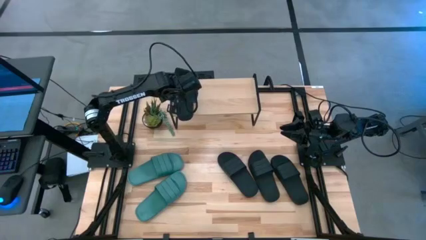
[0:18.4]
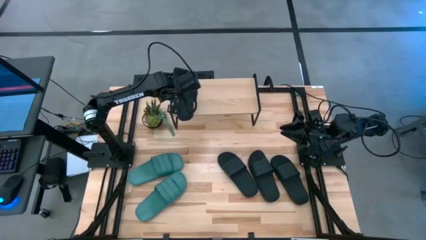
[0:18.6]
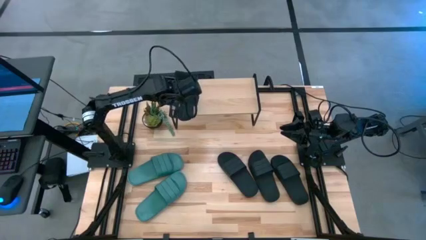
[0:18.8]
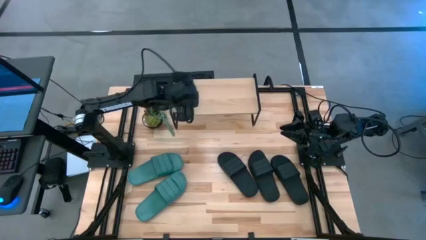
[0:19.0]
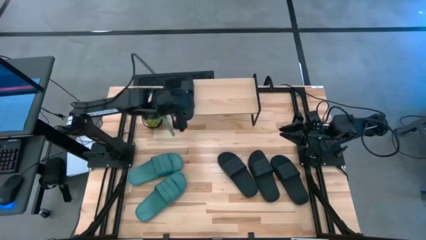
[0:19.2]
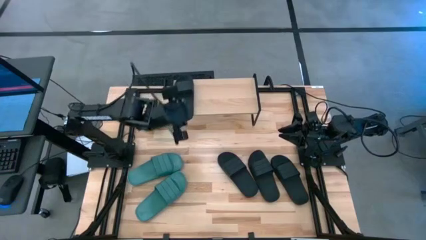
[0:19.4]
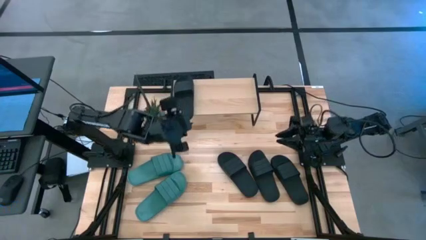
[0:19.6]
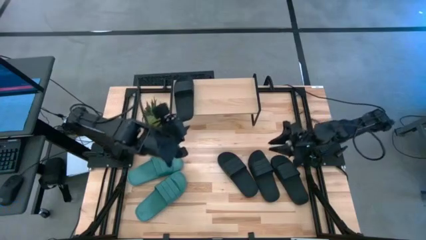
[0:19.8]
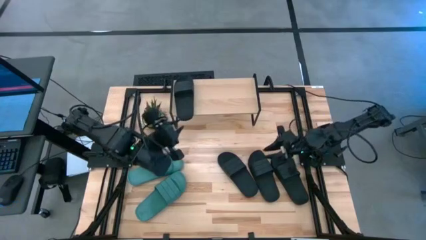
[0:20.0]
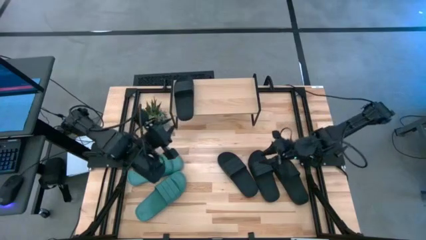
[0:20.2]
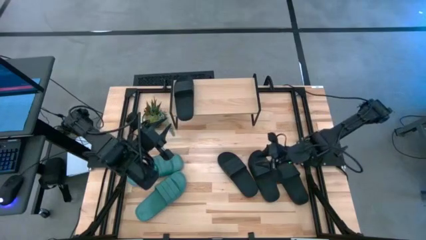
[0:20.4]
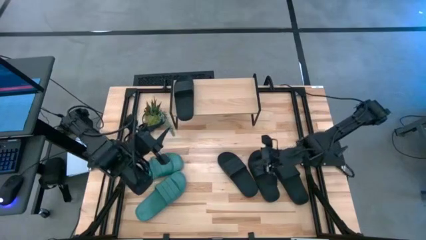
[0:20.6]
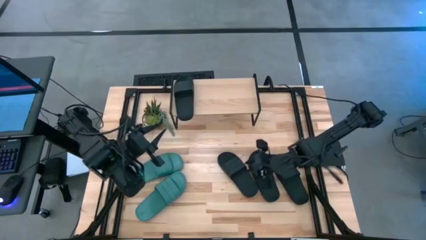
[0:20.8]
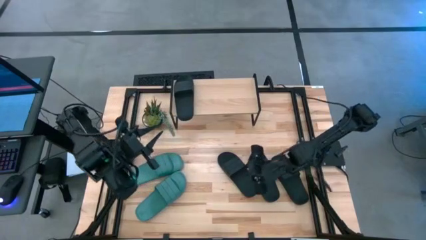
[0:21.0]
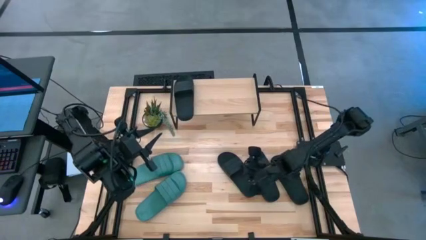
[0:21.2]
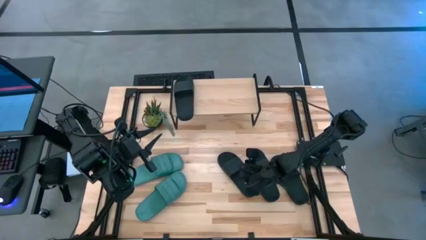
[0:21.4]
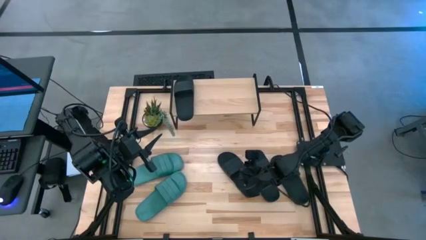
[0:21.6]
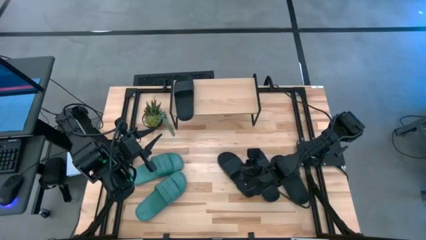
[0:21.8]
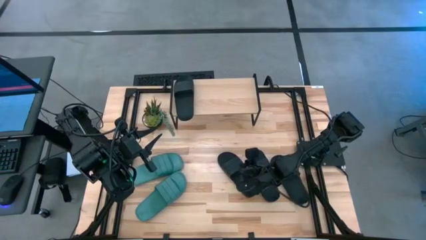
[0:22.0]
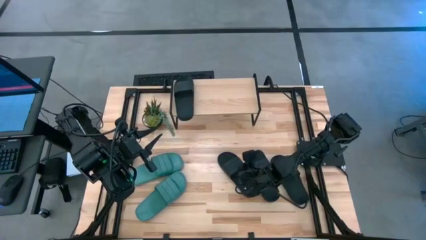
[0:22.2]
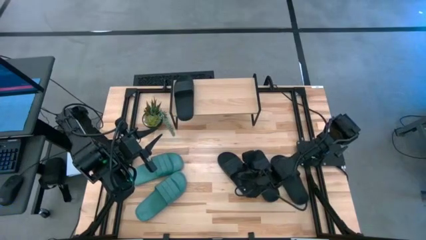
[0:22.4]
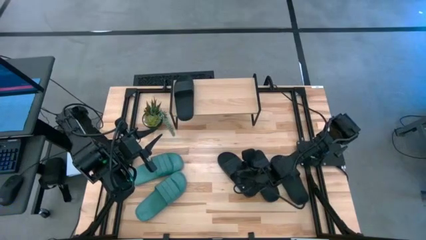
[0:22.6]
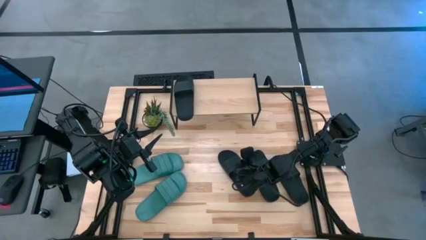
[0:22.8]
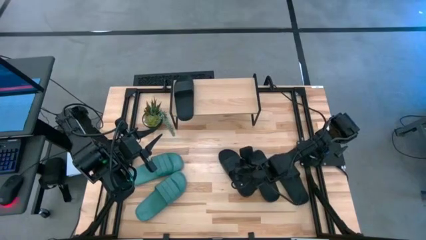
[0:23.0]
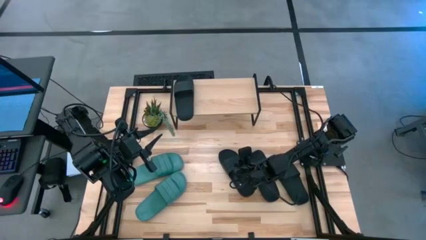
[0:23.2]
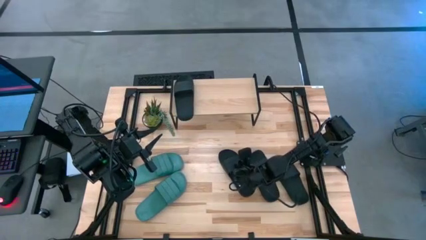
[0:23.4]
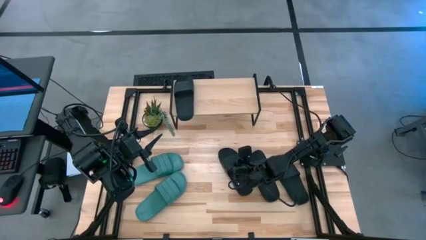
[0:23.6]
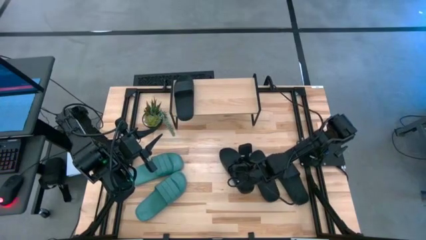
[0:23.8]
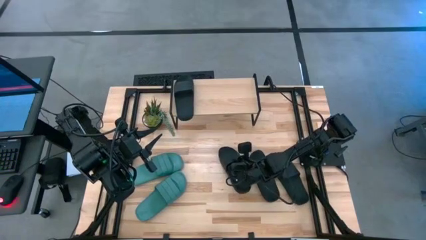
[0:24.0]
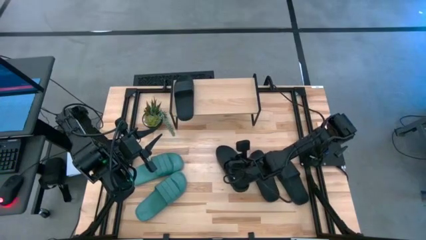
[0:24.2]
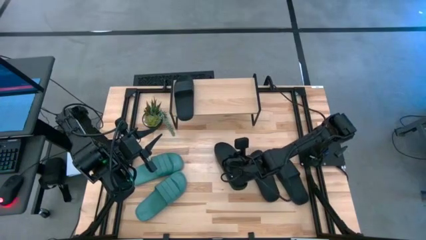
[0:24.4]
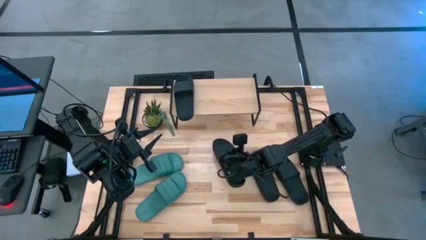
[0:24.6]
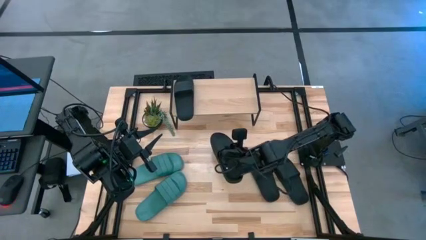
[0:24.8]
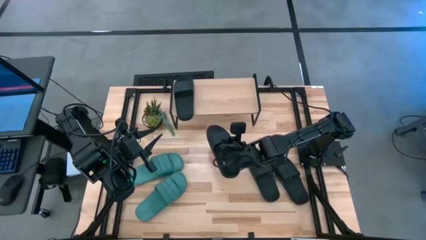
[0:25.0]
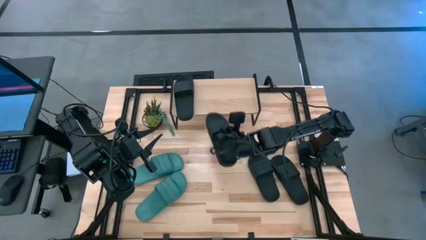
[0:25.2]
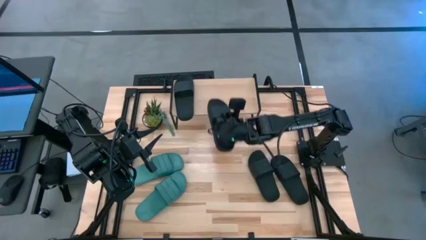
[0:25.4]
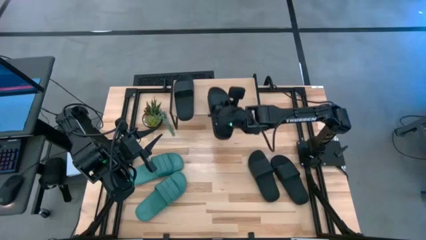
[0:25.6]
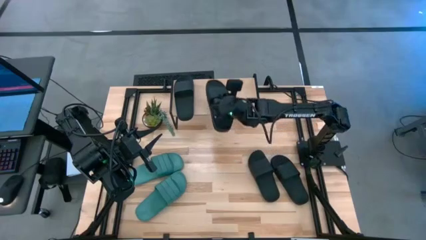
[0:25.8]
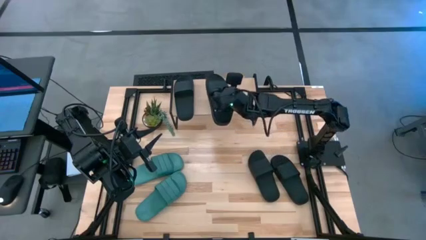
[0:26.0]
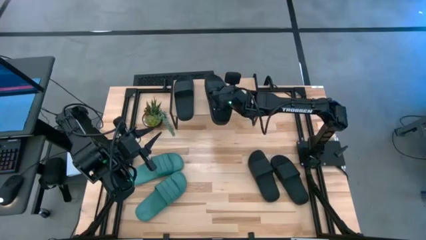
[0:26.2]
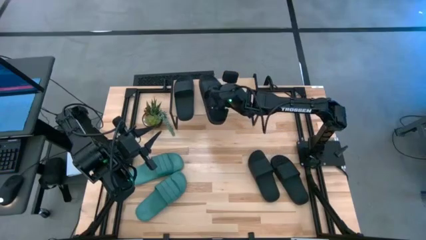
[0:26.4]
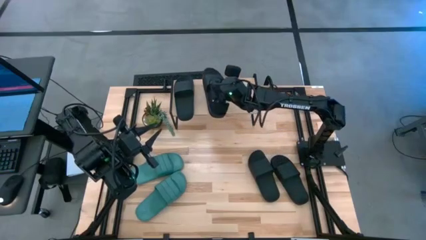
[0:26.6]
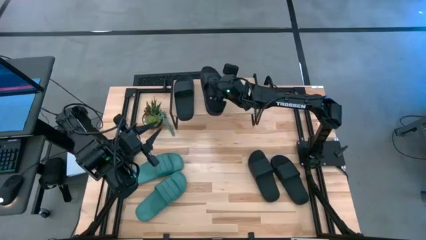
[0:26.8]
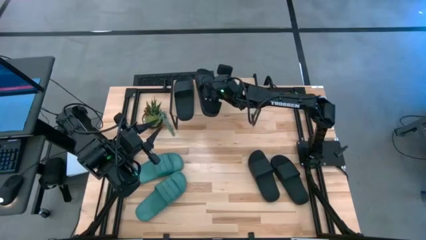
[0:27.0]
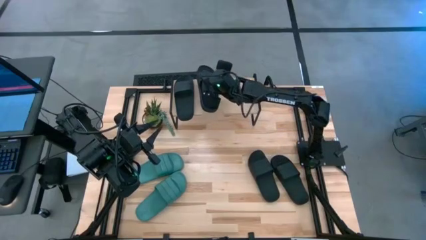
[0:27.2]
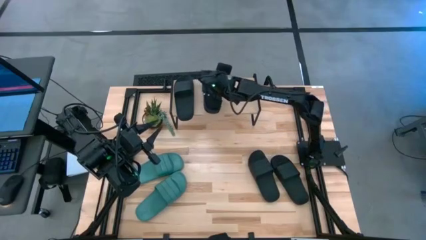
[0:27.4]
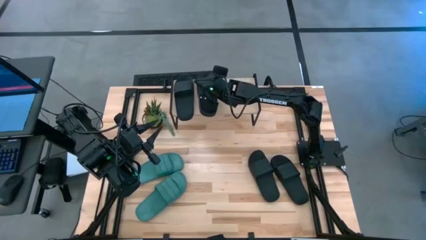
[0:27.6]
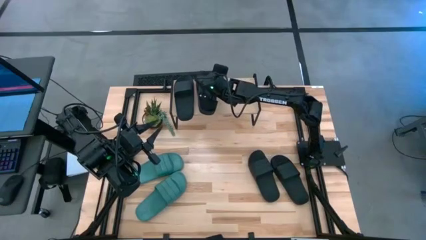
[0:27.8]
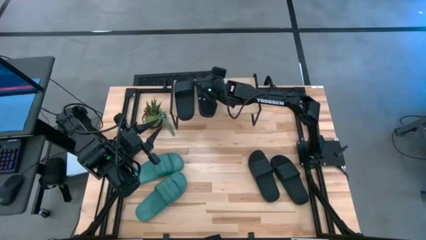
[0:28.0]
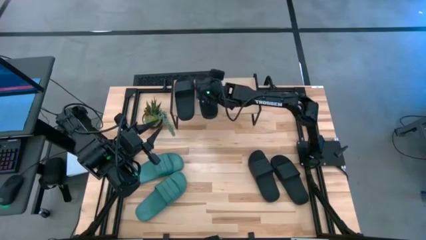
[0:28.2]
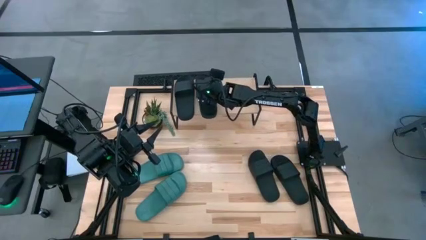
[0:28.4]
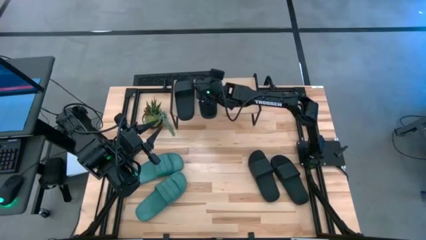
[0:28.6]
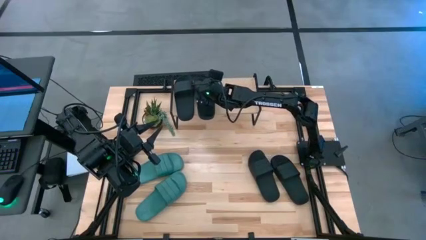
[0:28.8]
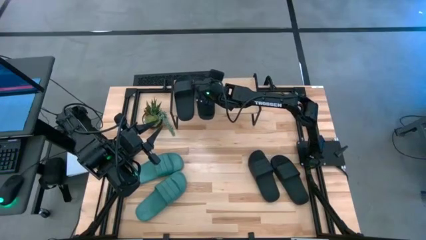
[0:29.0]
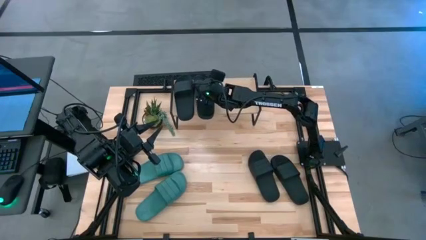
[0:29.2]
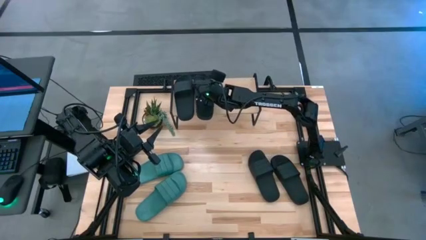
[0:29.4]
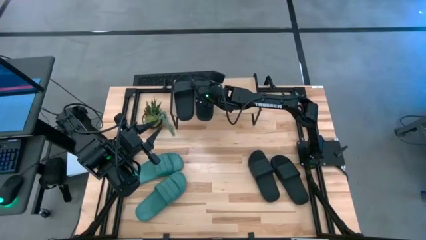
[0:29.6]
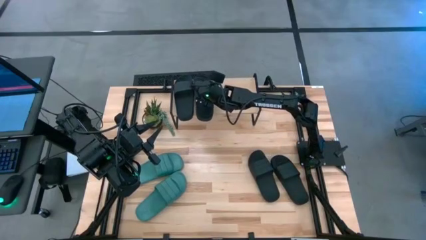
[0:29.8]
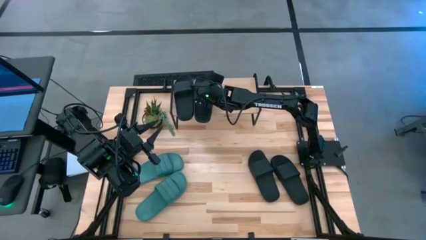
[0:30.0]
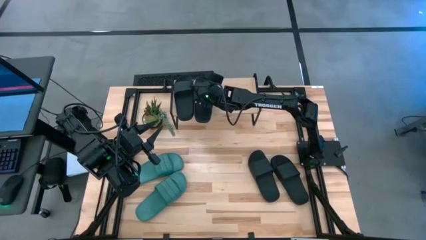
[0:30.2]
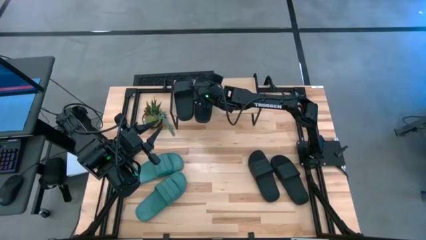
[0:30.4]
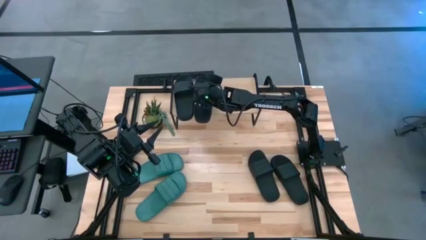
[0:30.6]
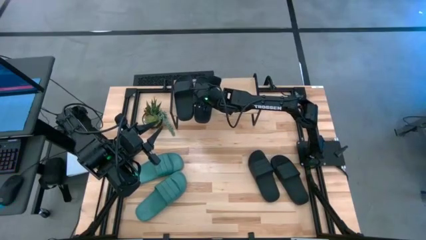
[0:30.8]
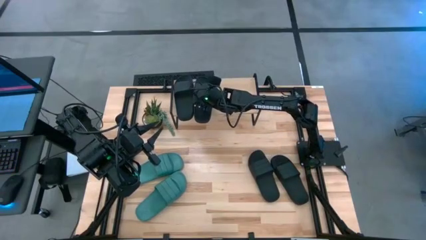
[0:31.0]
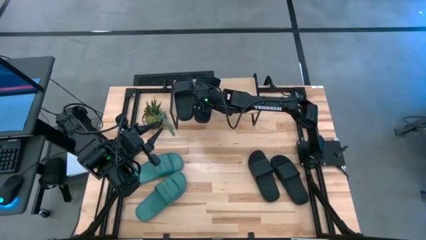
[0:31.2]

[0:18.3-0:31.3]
Task: Pick and place slides into the shelf
Put the black slide on the shelf

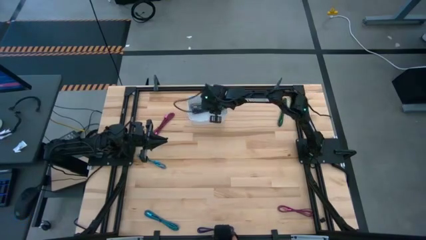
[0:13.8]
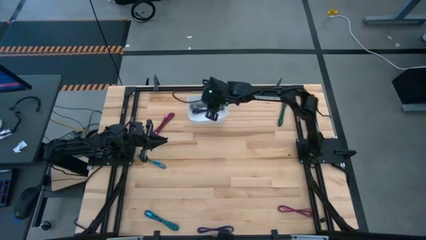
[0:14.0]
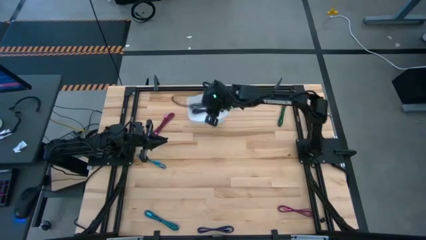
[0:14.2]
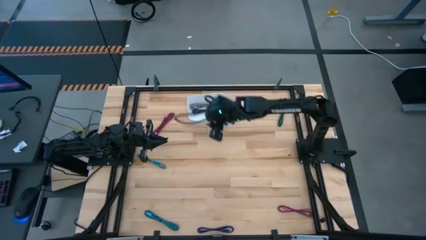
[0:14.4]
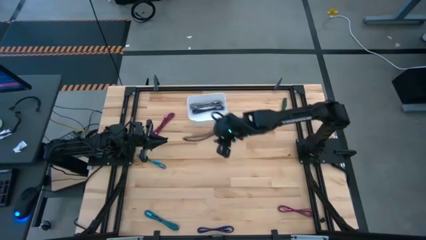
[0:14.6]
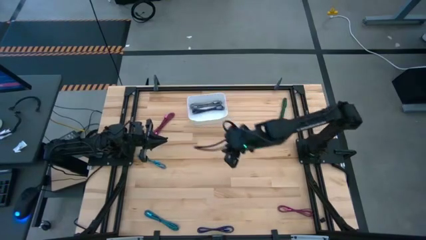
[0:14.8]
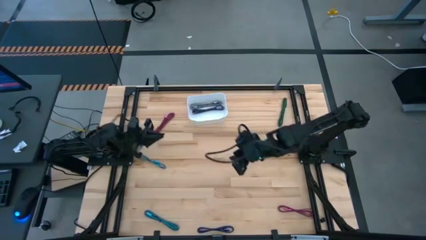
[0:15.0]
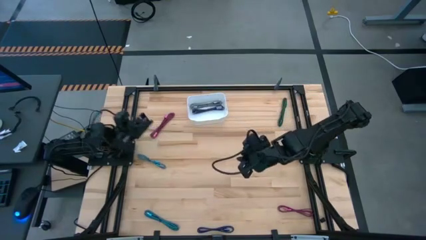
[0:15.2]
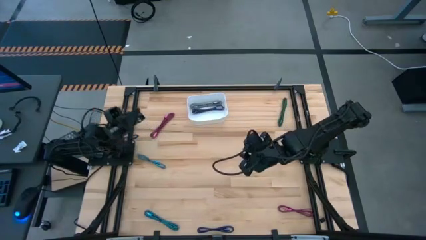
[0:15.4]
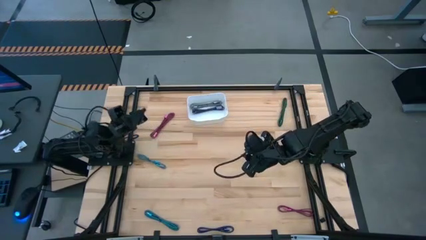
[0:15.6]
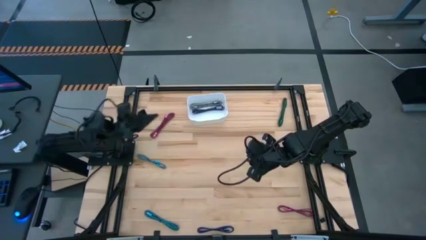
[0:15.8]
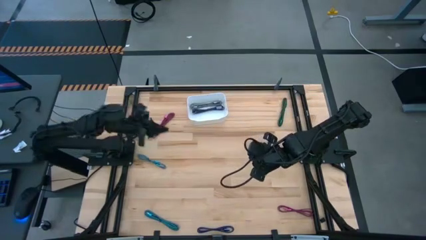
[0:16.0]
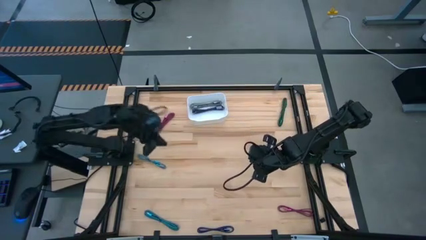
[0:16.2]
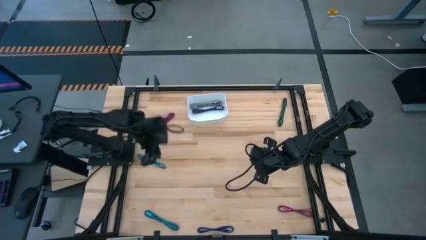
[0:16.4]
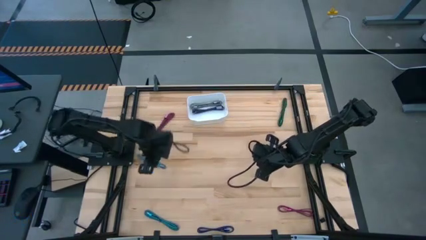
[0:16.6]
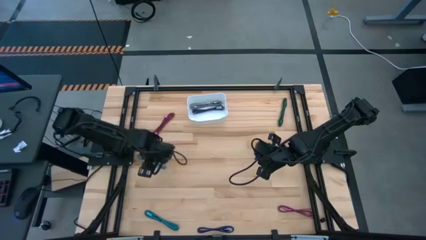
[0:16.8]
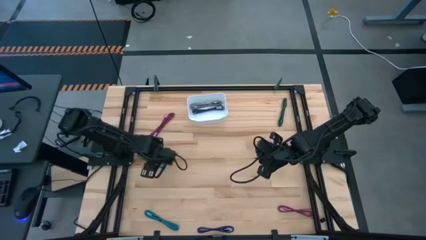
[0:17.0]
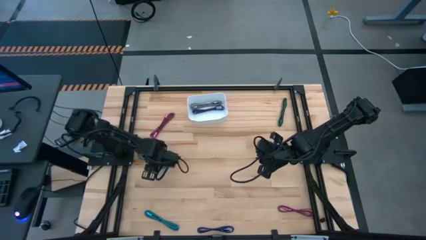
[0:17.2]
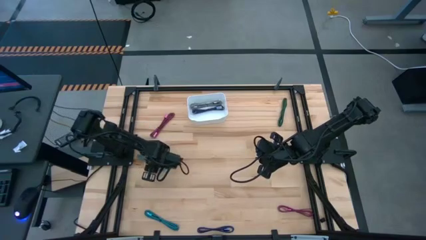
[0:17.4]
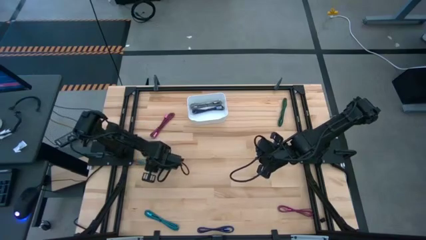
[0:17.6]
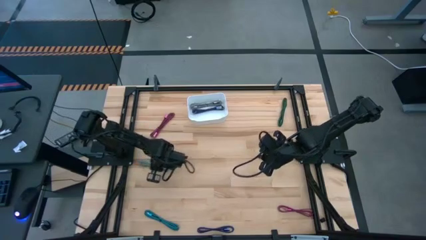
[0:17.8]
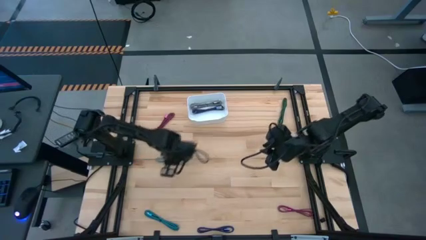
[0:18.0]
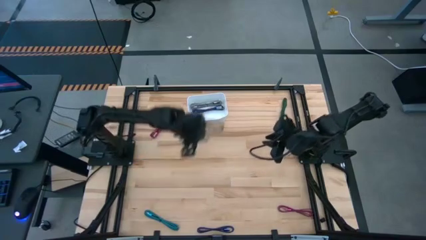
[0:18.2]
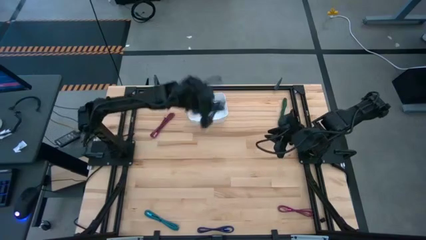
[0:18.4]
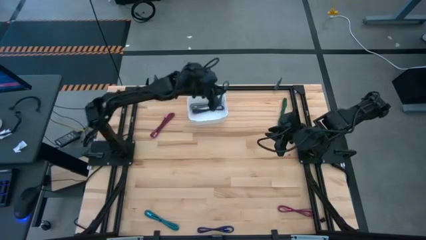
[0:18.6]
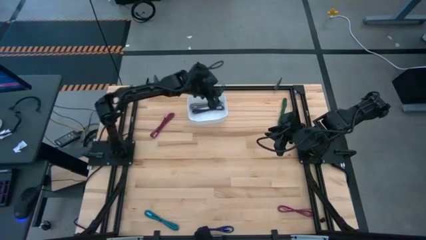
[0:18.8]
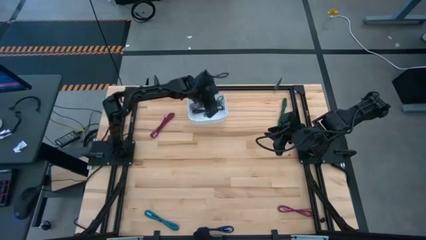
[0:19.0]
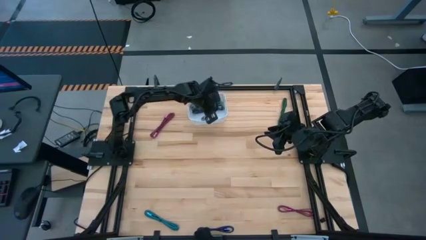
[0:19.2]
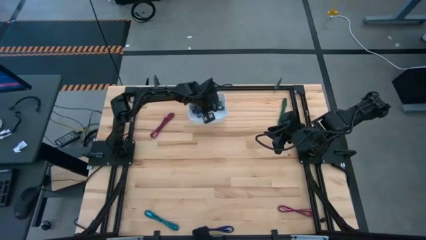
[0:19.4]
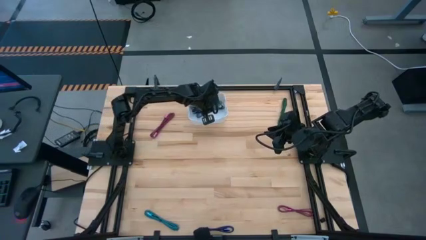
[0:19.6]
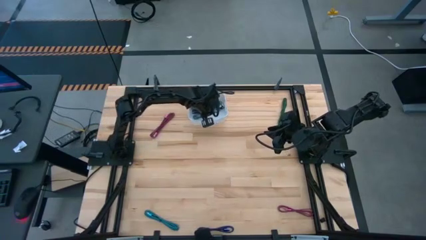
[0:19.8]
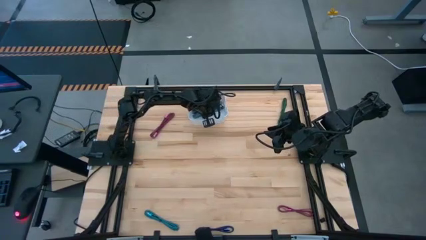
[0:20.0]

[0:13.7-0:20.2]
Task: Pick and place USB-C Cables
Put the top black blue charger cable into the white bin
